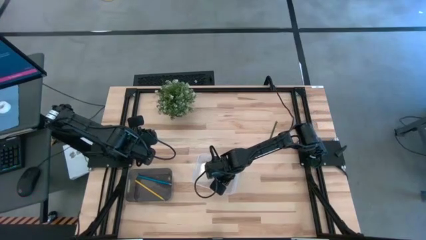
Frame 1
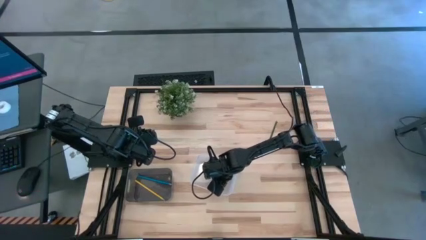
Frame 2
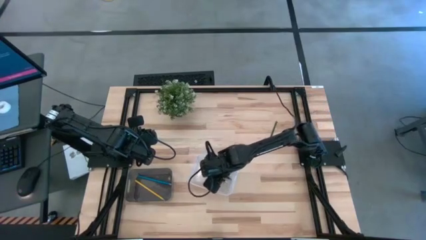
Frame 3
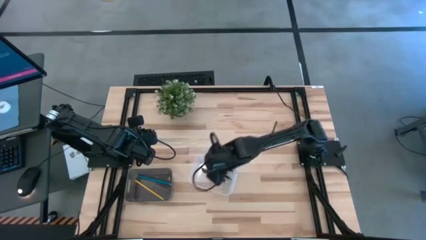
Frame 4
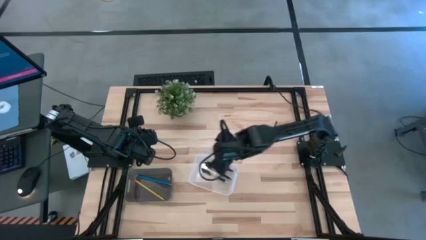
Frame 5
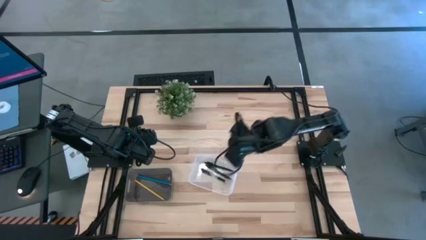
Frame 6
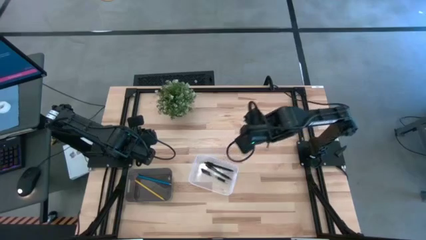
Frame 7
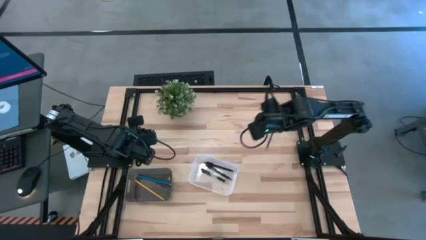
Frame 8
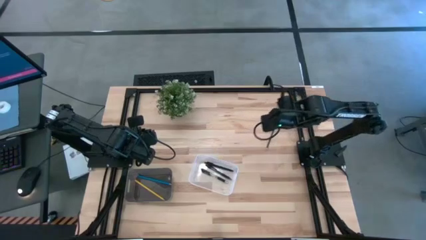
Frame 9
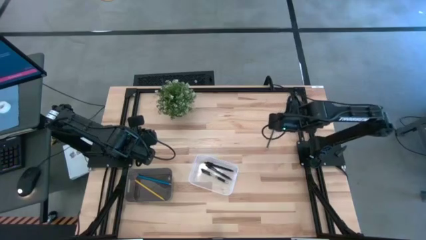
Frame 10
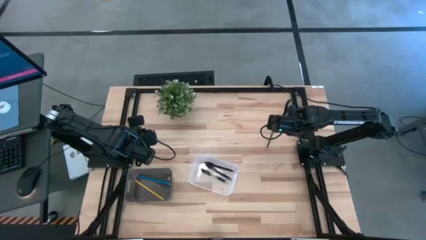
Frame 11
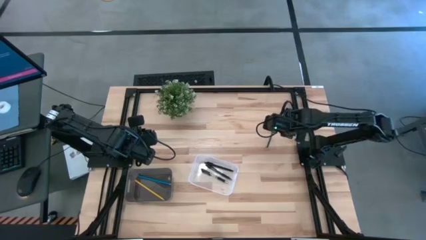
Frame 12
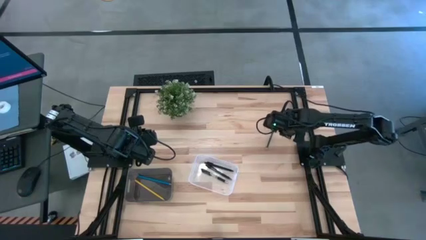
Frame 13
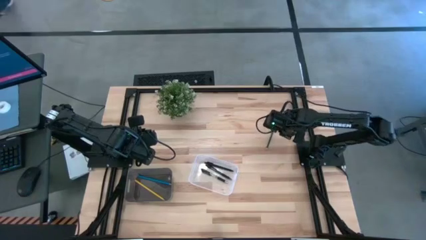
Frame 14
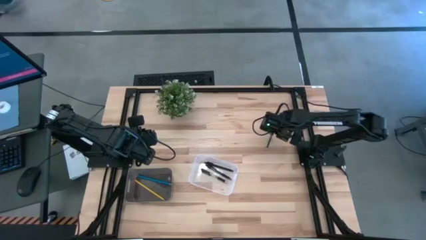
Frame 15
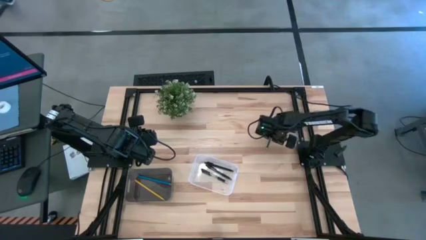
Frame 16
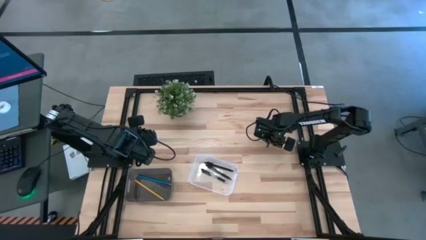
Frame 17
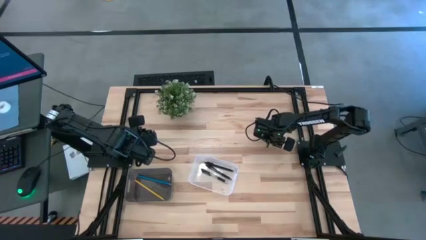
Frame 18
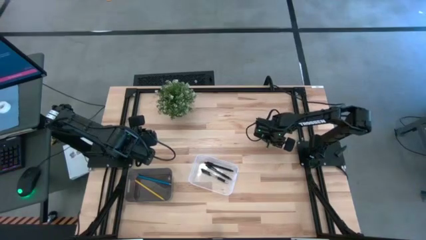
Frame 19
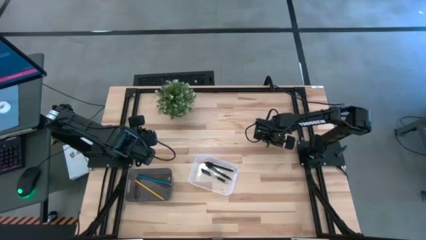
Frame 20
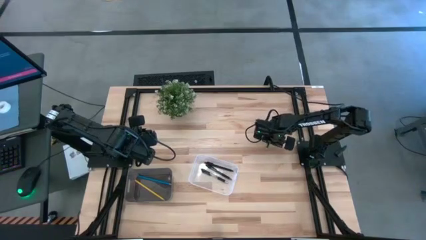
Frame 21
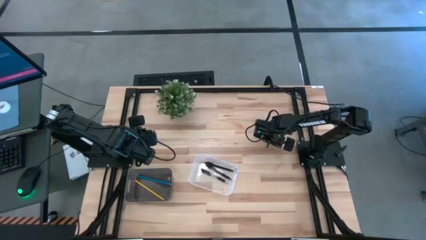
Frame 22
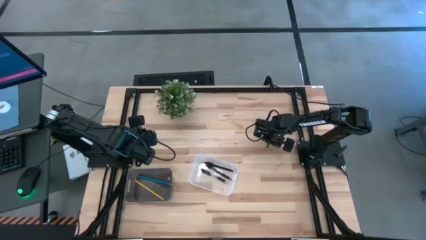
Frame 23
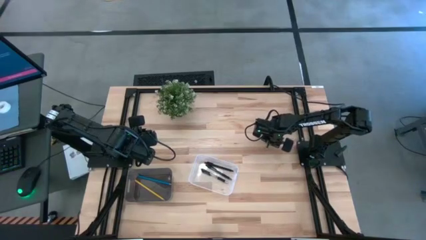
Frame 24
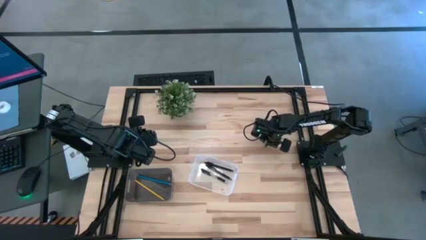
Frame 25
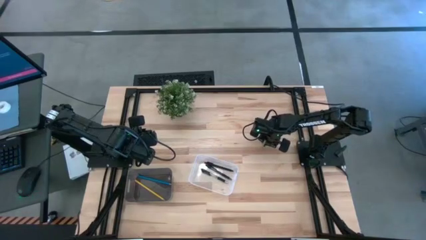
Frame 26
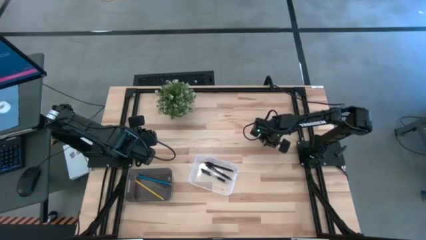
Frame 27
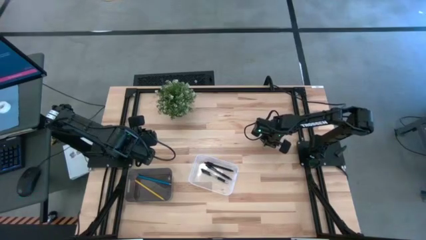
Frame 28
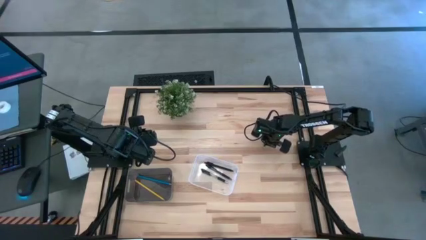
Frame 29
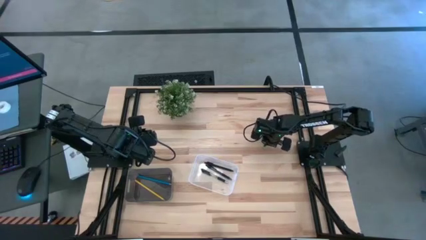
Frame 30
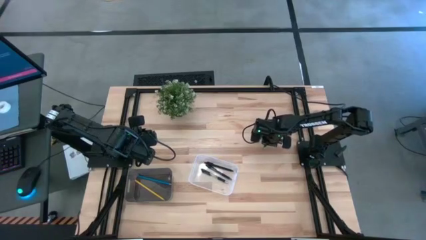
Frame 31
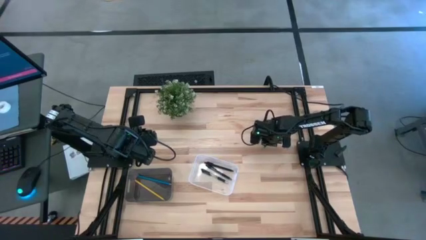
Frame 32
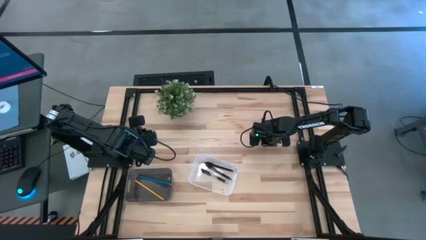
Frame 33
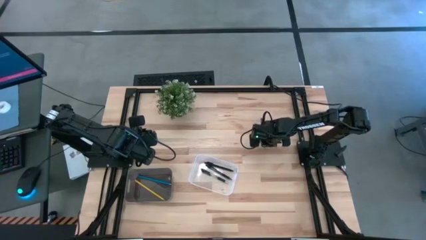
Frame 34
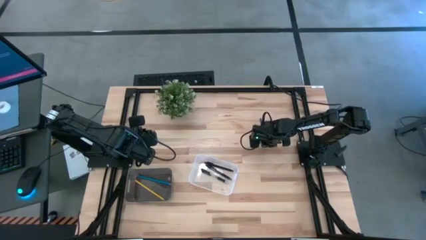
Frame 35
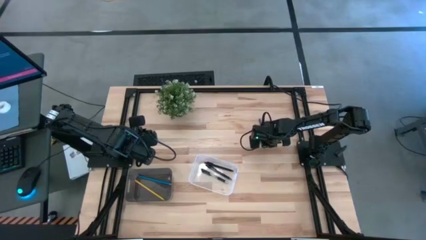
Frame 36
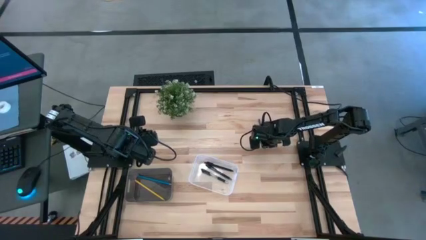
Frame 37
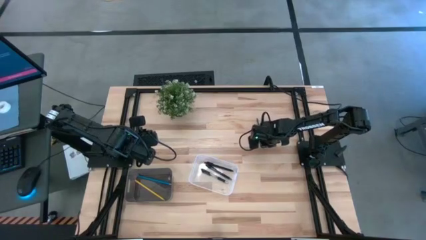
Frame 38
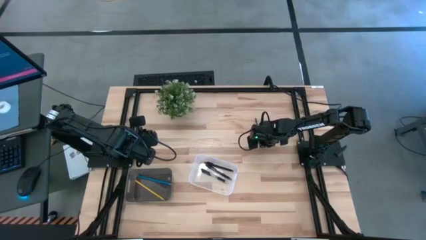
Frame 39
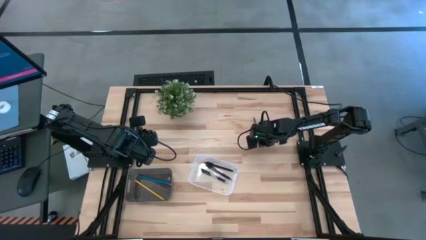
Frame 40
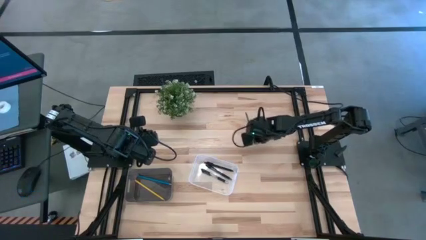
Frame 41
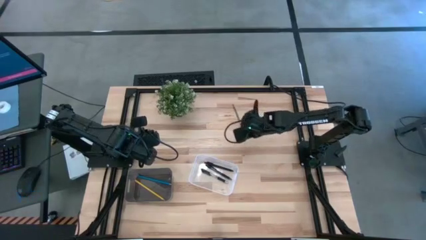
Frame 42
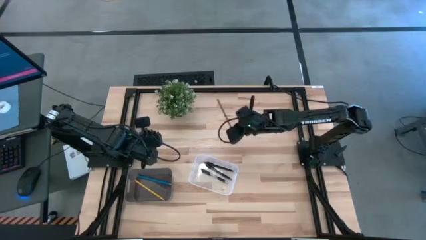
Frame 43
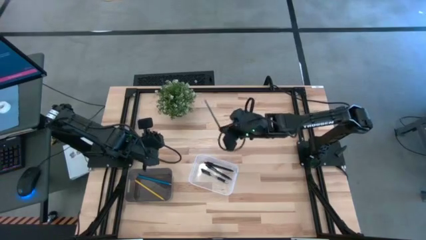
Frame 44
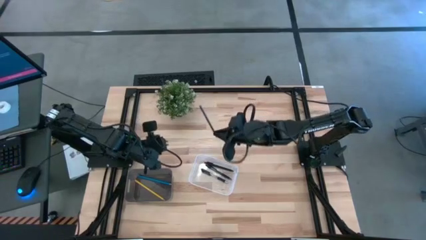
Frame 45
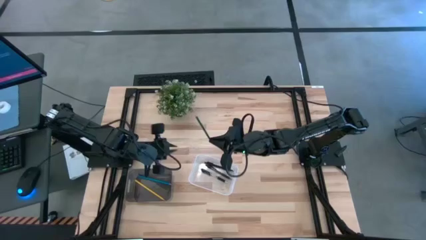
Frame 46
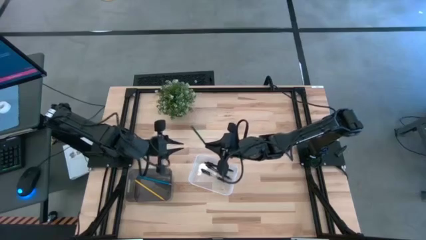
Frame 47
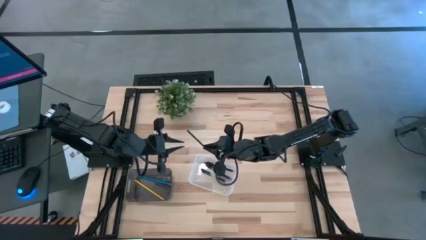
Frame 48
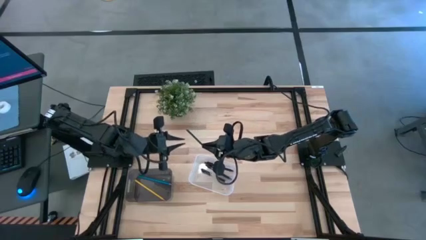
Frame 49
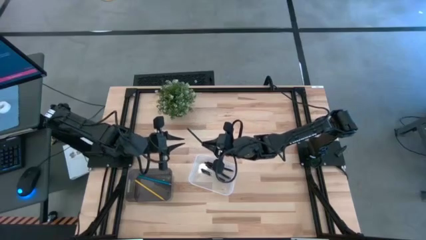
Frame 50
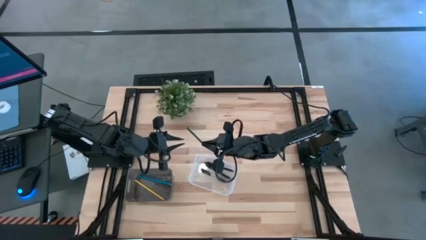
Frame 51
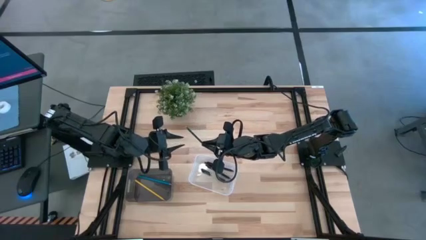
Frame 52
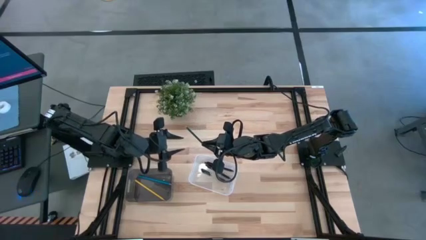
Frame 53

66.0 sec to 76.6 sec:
Task: Sort pens & pencils
Put the green pencil into the black bin
